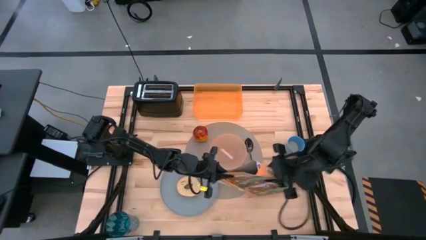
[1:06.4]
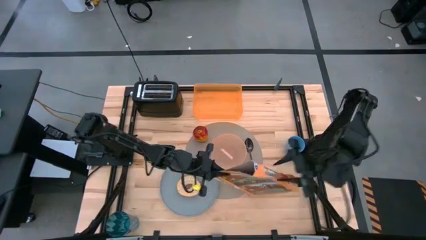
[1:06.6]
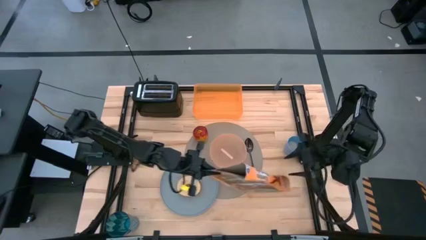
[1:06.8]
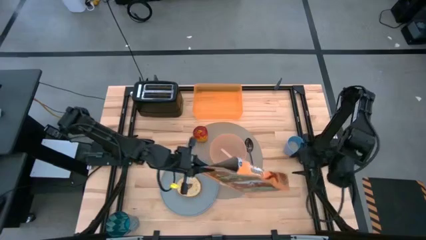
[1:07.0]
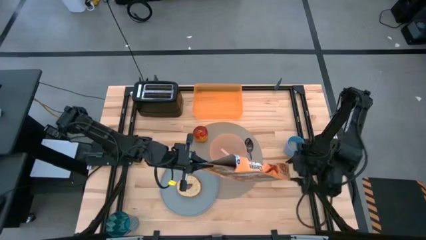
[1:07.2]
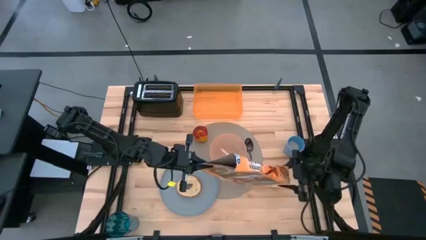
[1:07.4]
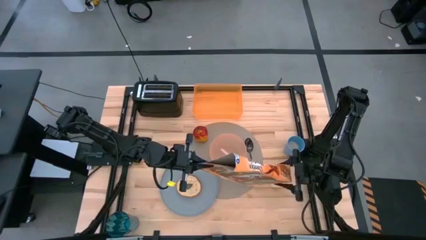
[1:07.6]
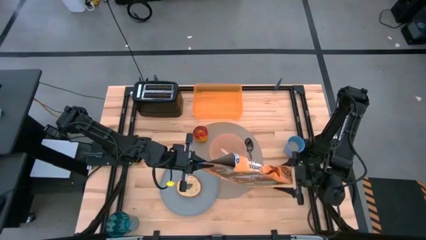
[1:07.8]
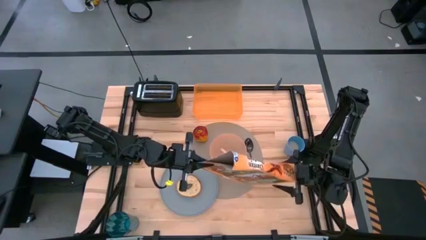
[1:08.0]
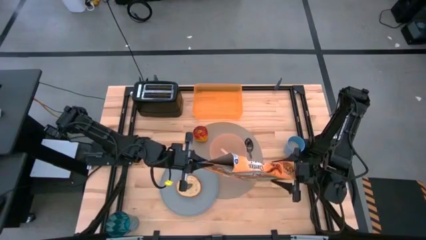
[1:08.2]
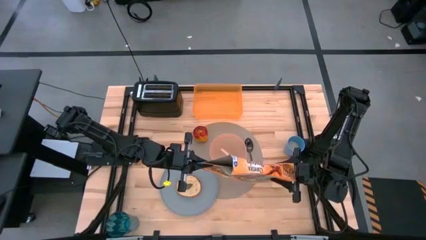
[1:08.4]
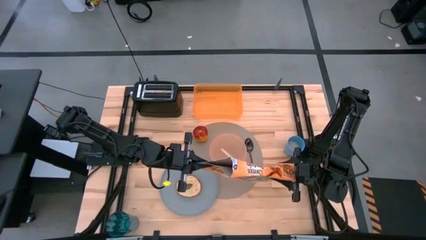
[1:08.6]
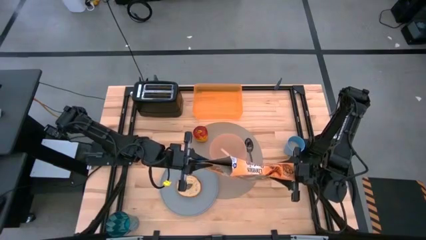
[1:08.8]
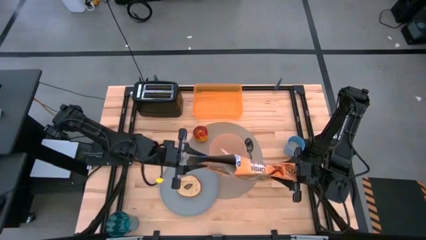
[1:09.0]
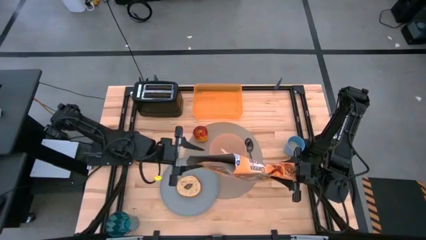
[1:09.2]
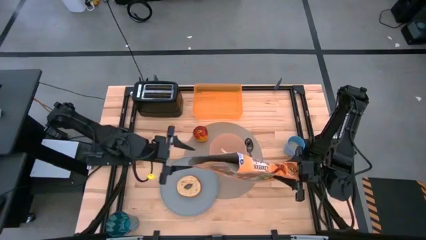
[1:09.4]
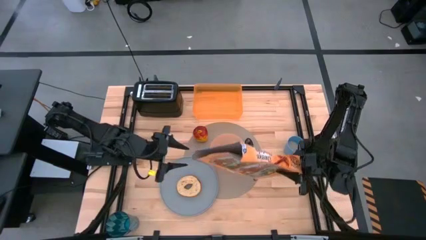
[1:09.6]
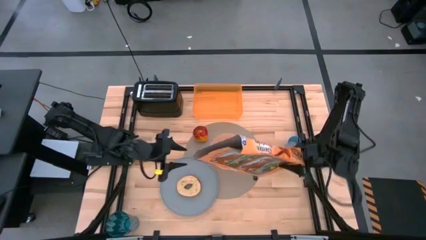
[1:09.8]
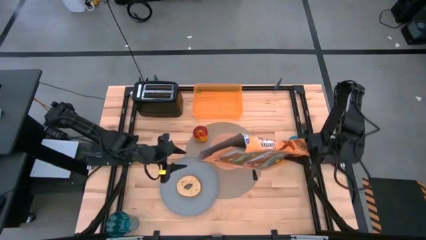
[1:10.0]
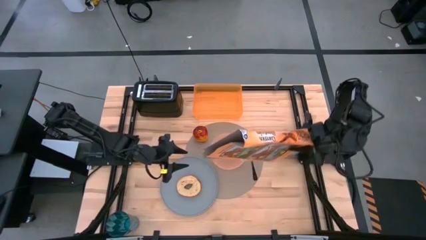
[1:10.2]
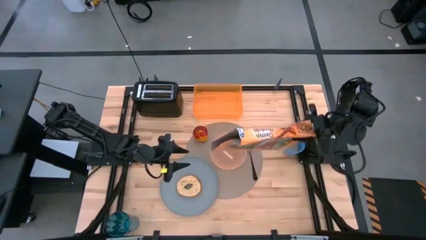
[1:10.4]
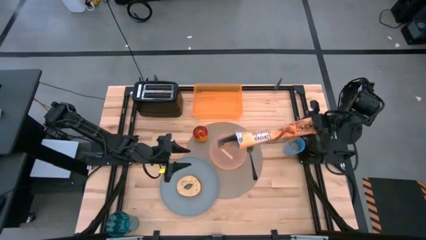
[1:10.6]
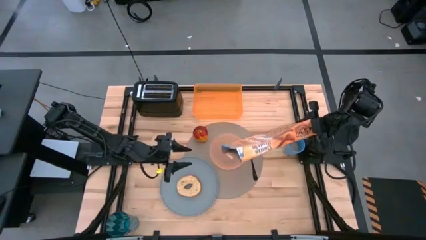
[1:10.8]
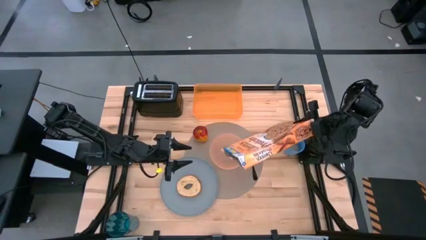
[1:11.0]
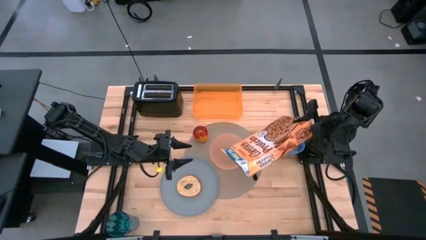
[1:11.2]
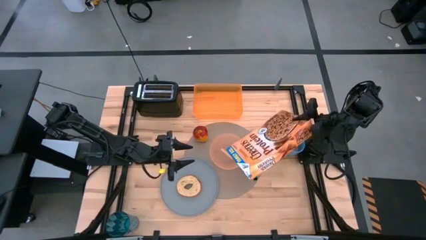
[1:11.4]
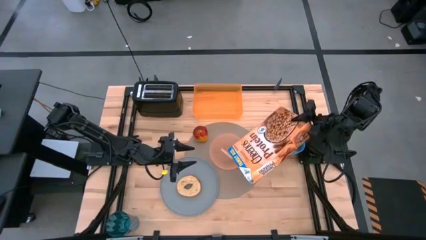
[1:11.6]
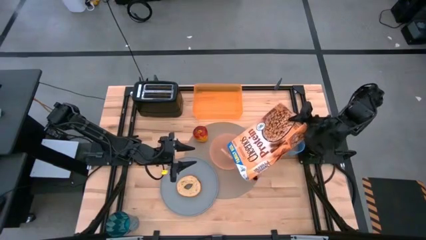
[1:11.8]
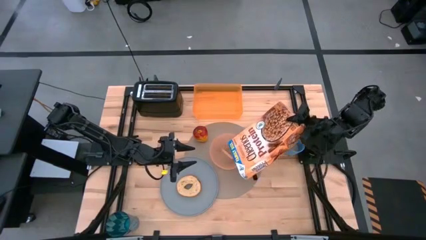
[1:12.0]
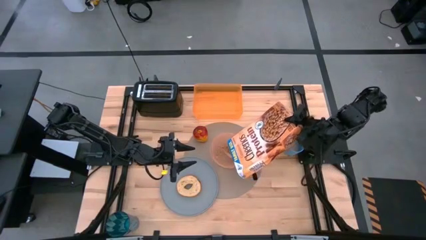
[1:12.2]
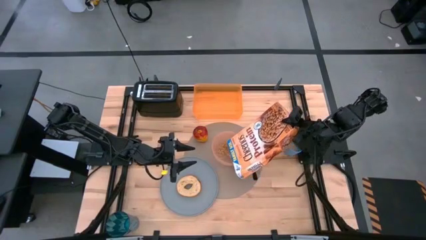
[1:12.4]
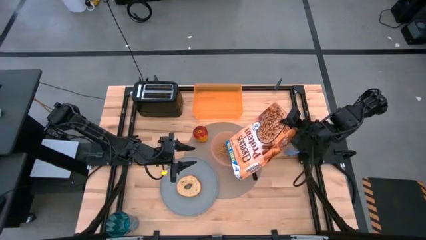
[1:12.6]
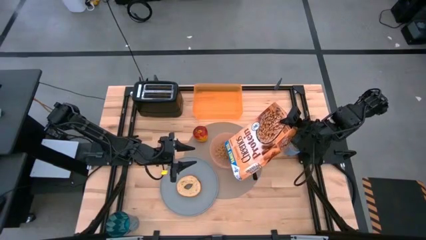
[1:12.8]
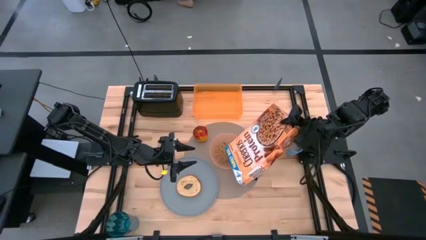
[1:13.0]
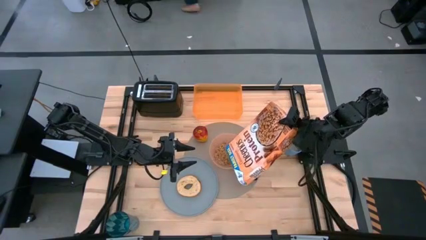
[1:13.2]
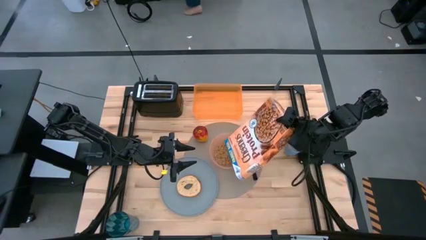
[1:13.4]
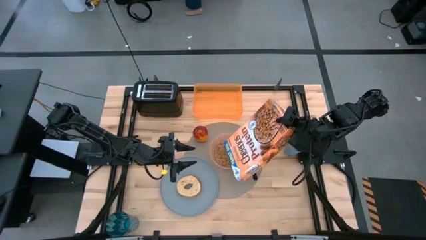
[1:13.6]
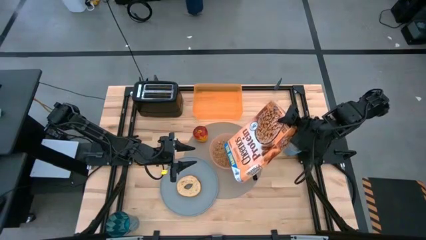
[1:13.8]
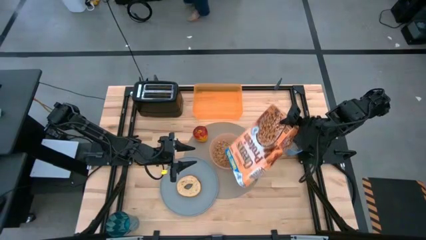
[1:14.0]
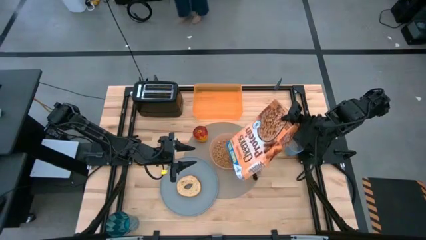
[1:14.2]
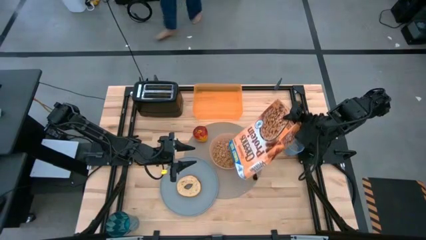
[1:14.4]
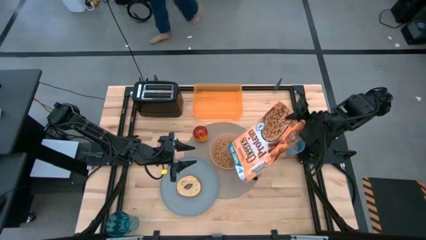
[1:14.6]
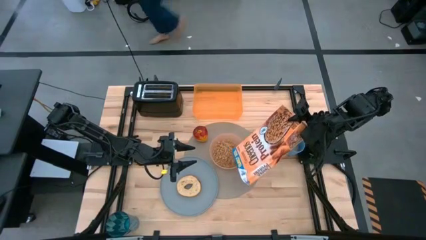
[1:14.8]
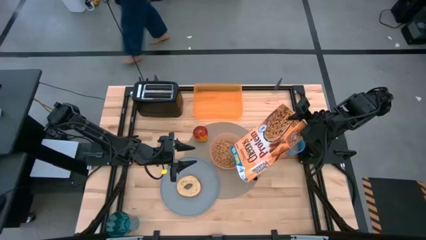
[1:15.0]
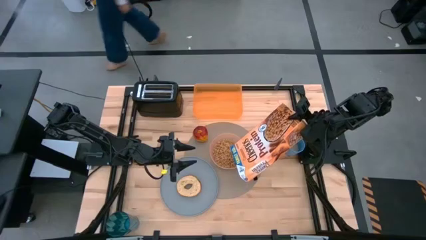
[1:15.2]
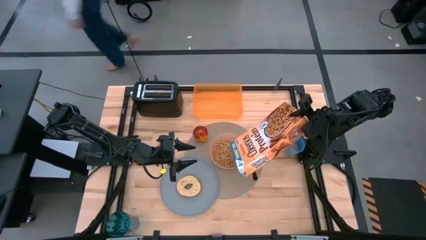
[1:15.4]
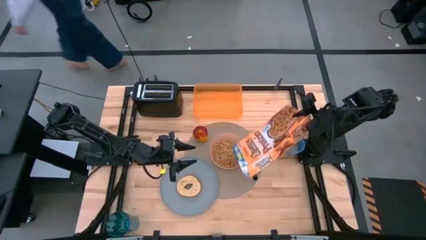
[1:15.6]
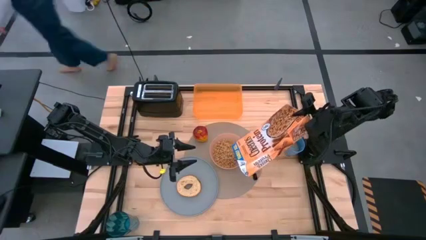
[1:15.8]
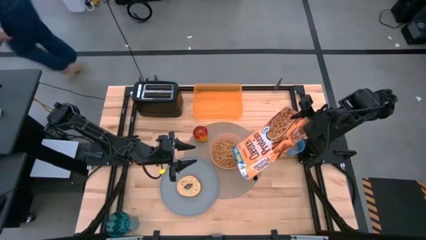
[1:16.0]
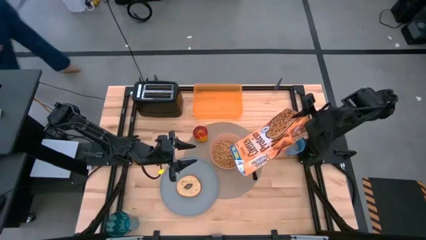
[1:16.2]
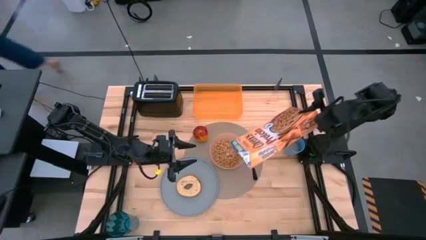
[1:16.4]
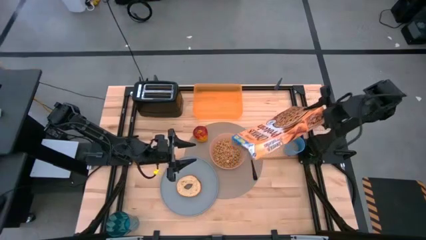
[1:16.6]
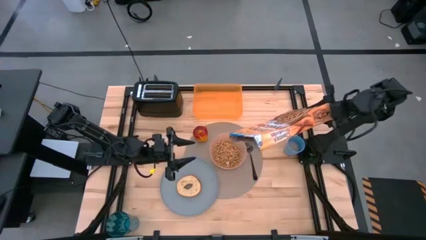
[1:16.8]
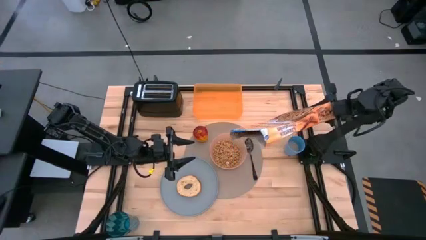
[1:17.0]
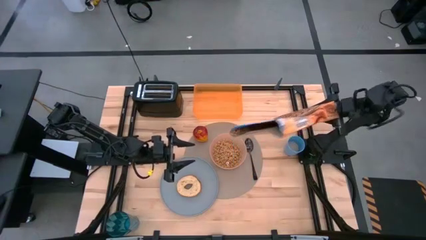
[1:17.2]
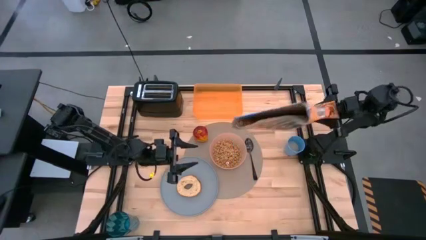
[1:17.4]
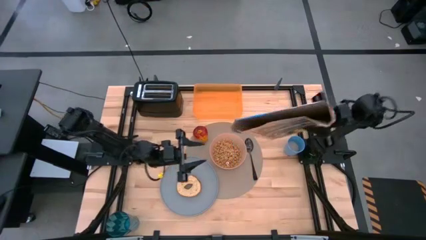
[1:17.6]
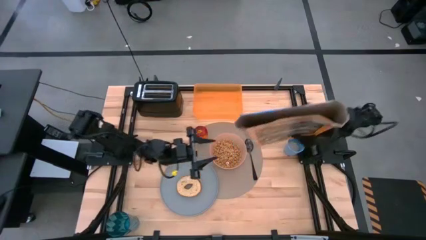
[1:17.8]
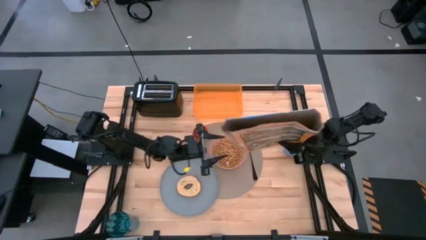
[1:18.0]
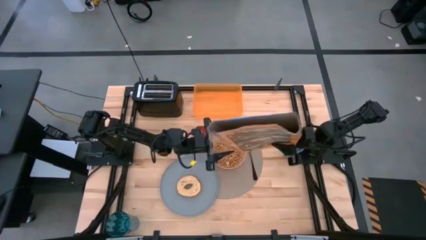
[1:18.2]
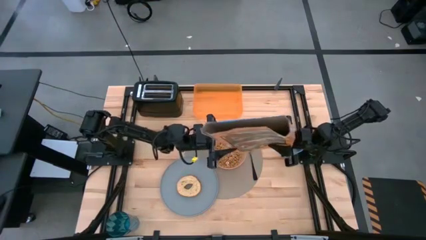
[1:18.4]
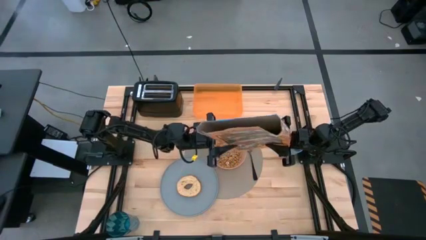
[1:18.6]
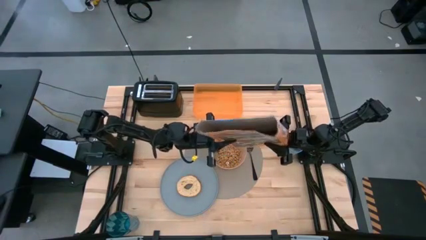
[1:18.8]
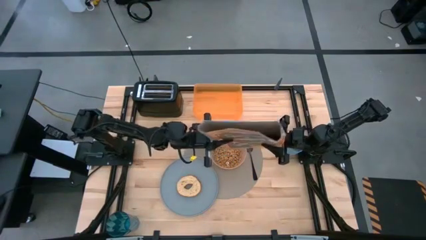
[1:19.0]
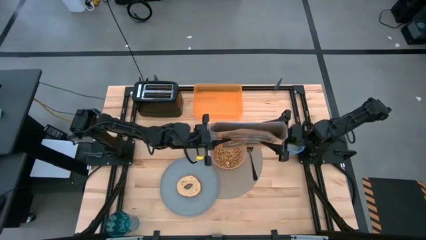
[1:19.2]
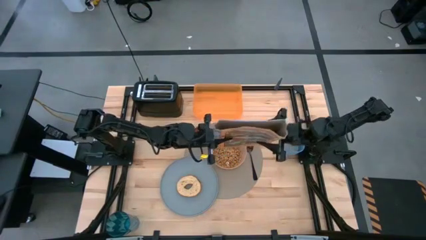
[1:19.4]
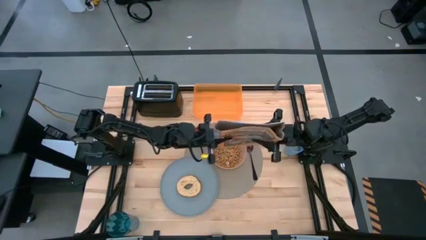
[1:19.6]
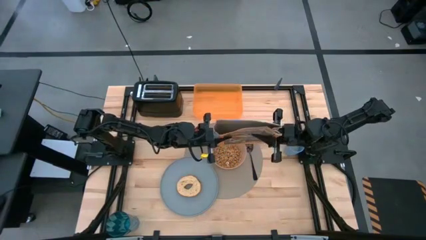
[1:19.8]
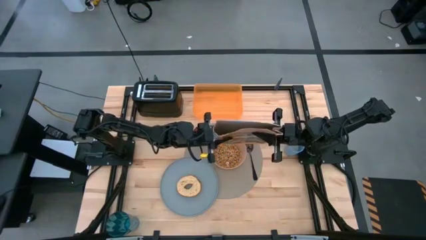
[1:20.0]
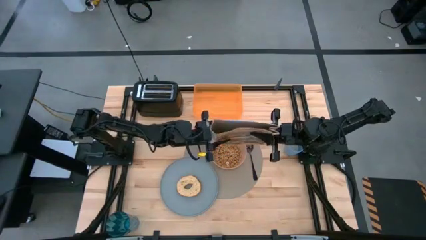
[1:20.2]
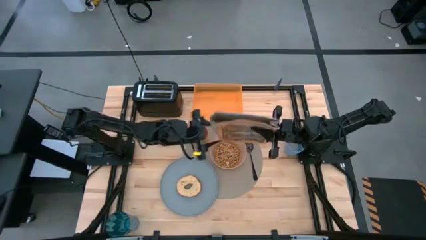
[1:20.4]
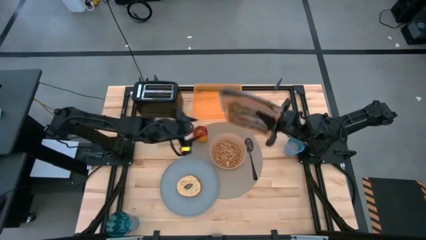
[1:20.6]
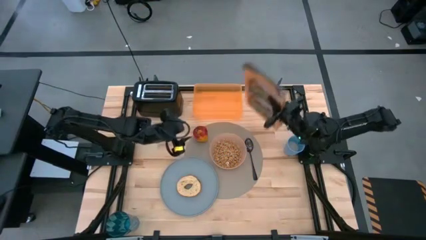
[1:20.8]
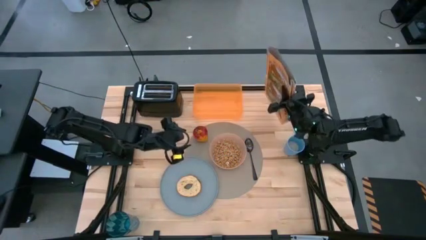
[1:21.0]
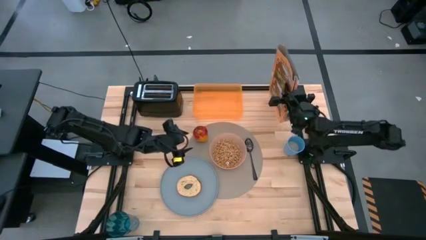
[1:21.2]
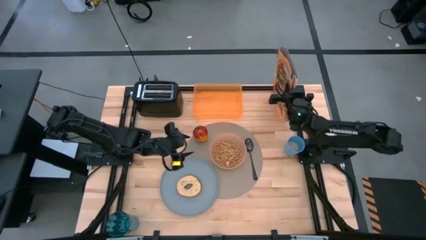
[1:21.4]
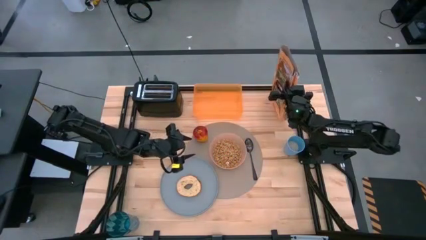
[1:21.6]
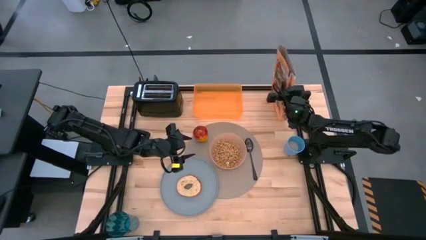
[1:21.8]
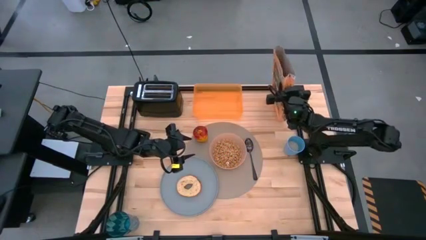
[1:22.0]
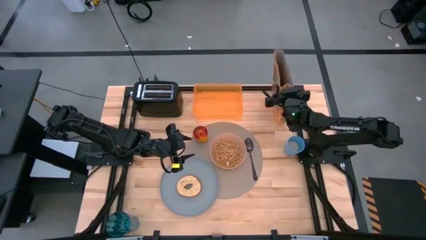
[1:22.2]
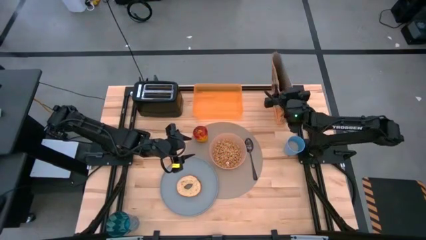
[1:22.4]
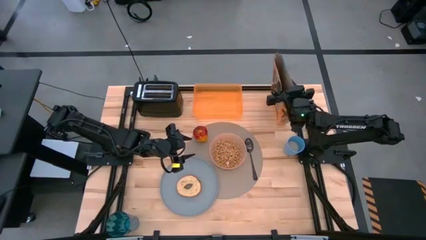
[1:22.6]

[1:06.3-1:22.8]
Task: Arrange a breakfast setting
Pour the cereal from the yellow cereal box into the light orange bowl
